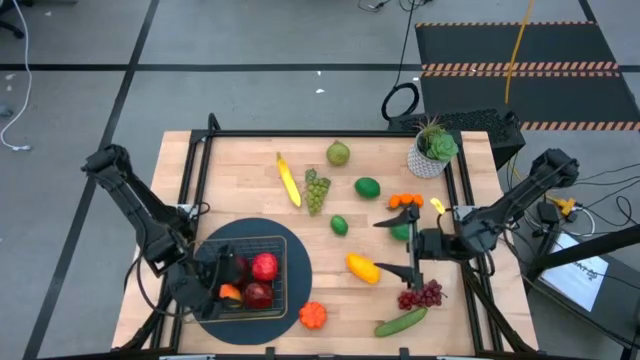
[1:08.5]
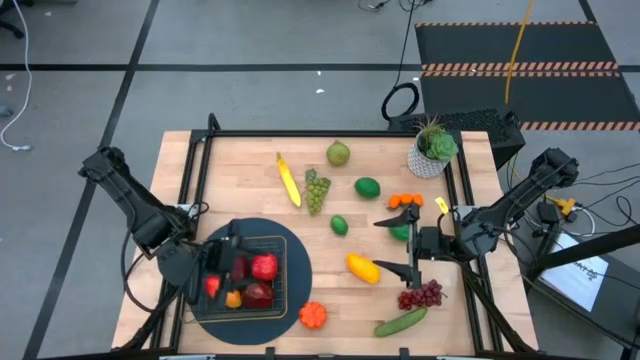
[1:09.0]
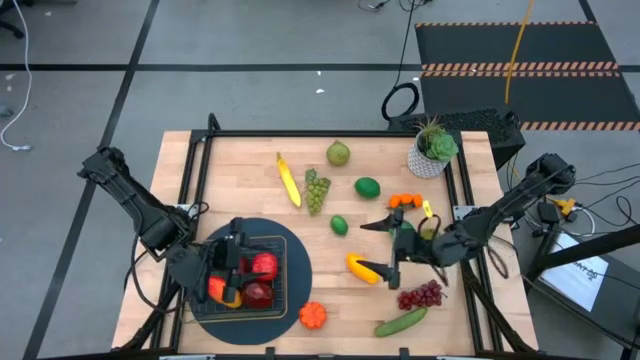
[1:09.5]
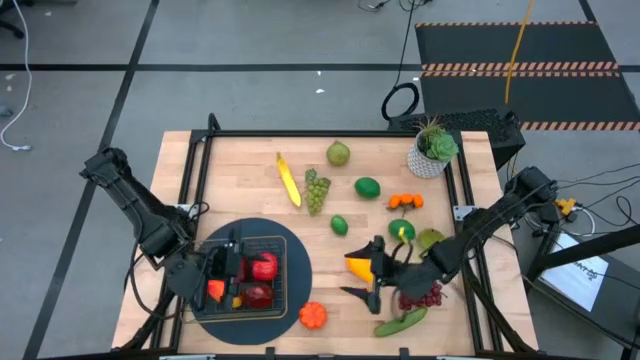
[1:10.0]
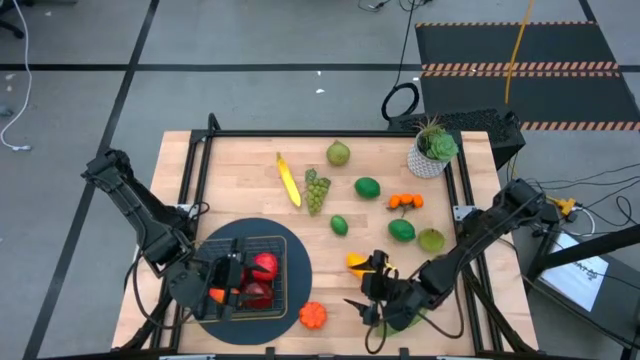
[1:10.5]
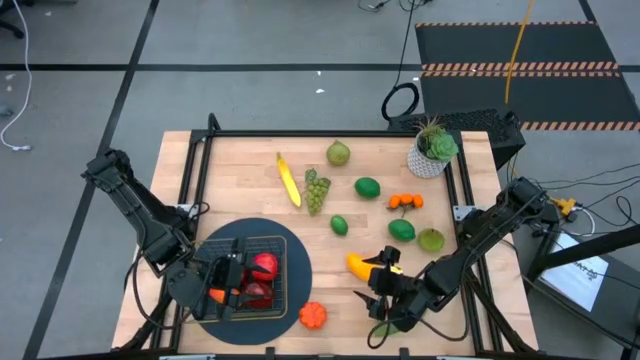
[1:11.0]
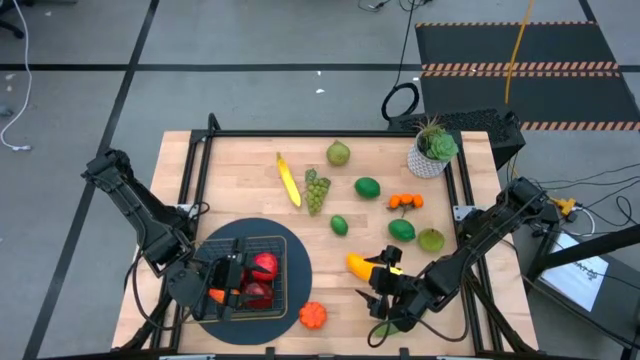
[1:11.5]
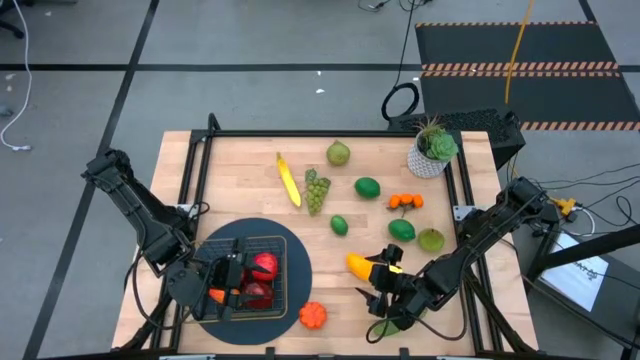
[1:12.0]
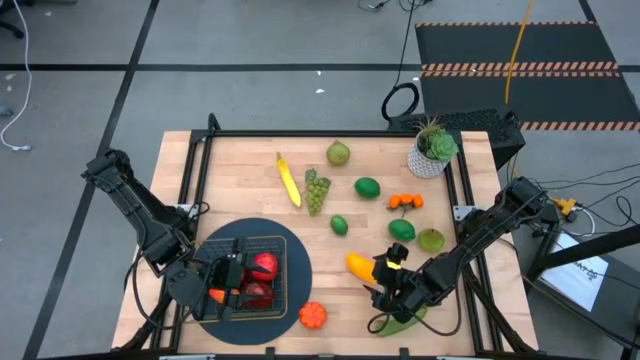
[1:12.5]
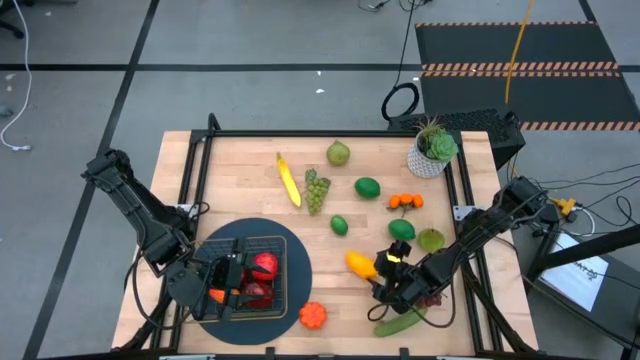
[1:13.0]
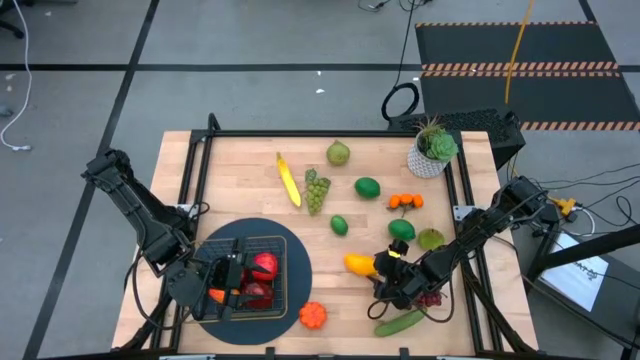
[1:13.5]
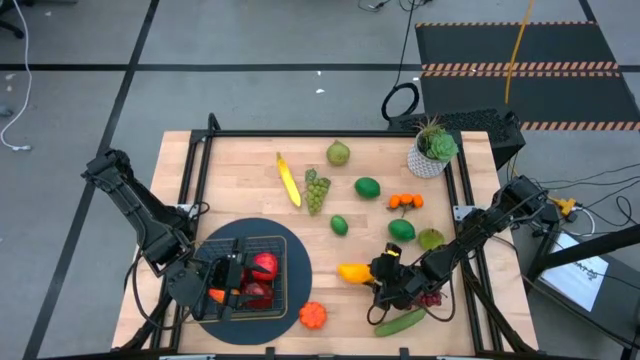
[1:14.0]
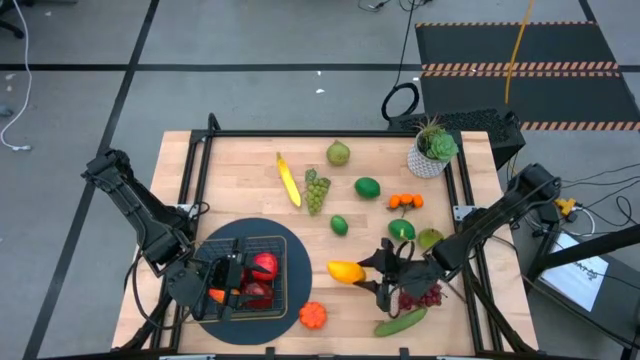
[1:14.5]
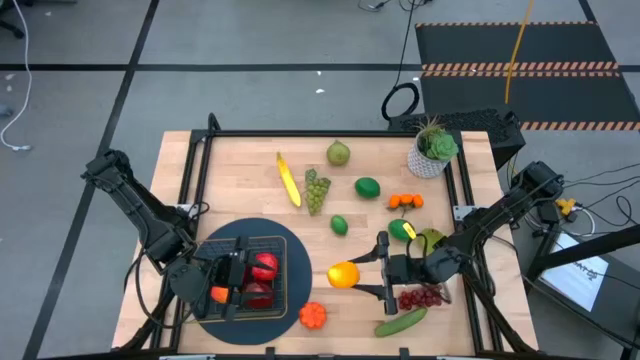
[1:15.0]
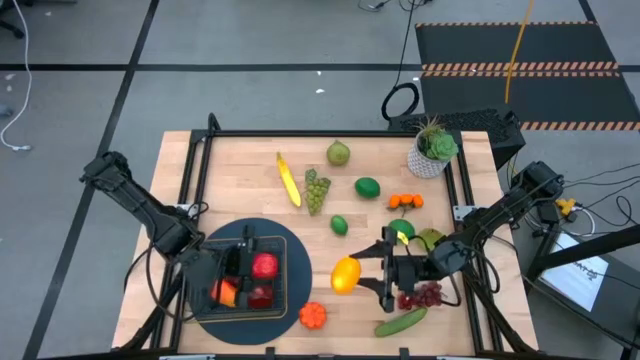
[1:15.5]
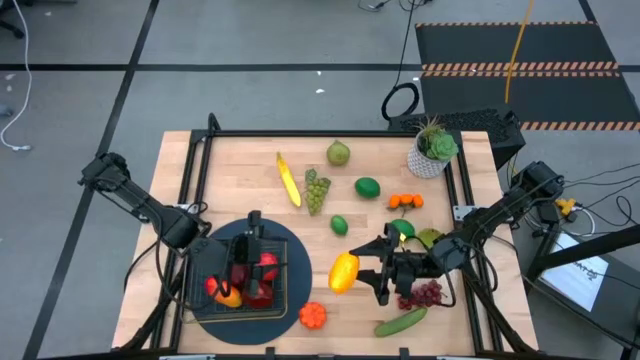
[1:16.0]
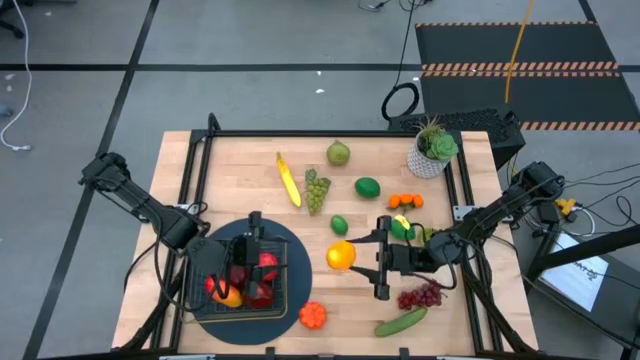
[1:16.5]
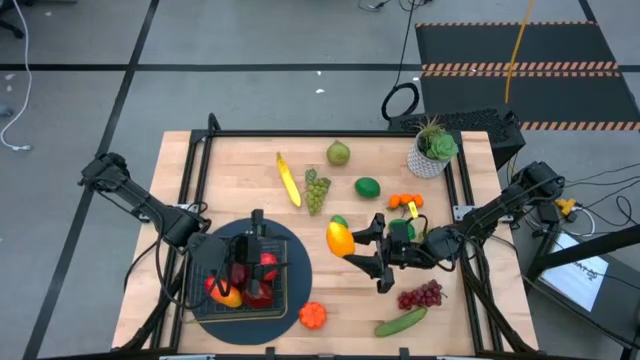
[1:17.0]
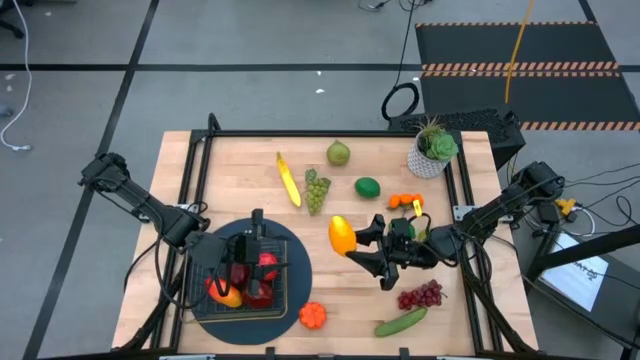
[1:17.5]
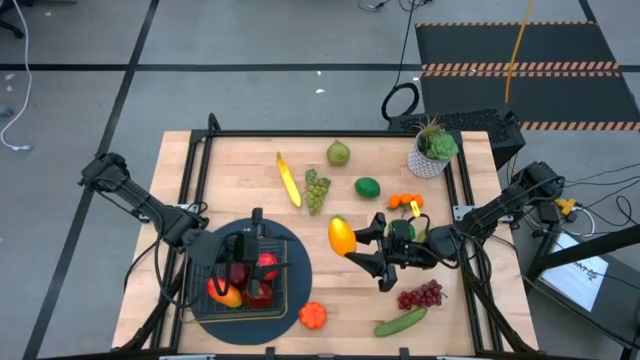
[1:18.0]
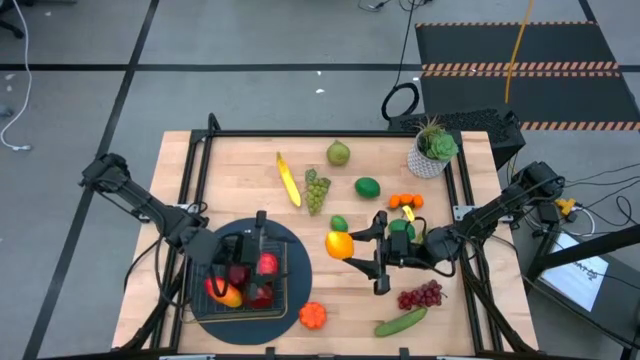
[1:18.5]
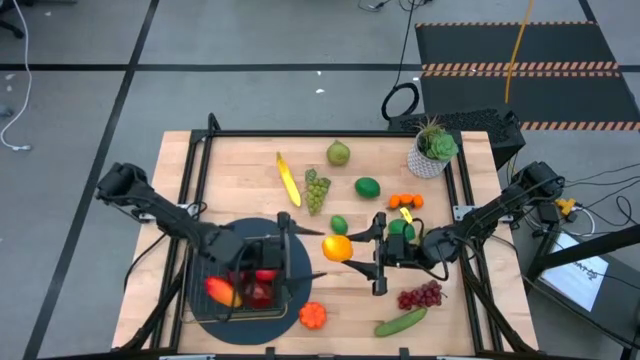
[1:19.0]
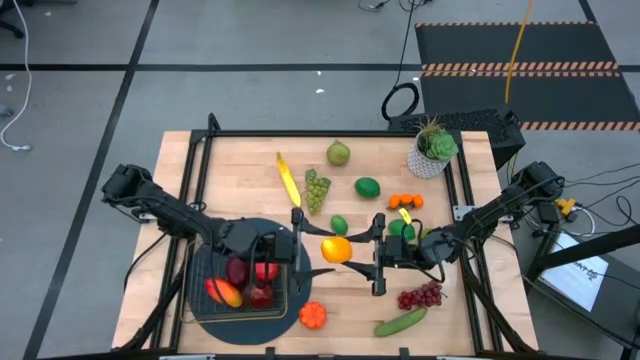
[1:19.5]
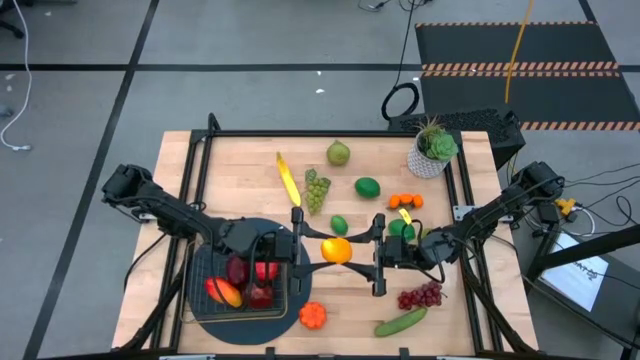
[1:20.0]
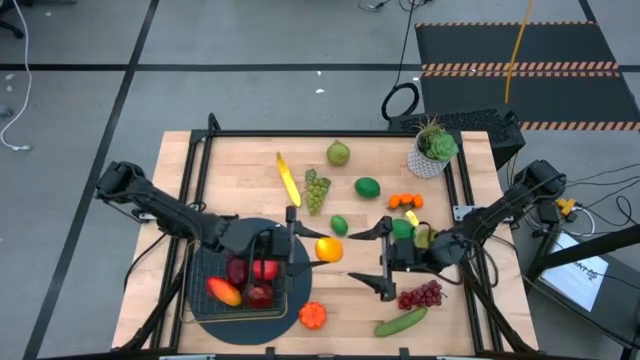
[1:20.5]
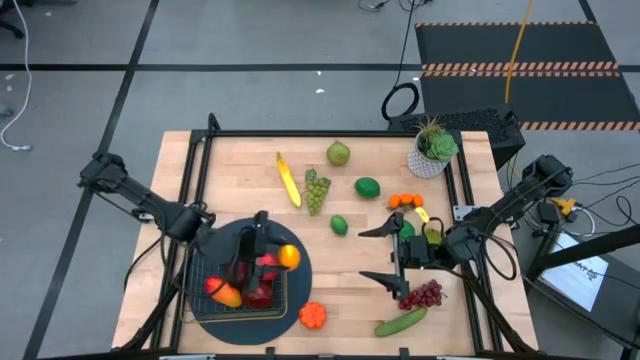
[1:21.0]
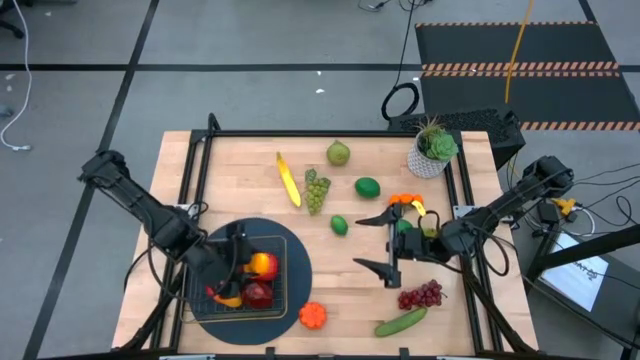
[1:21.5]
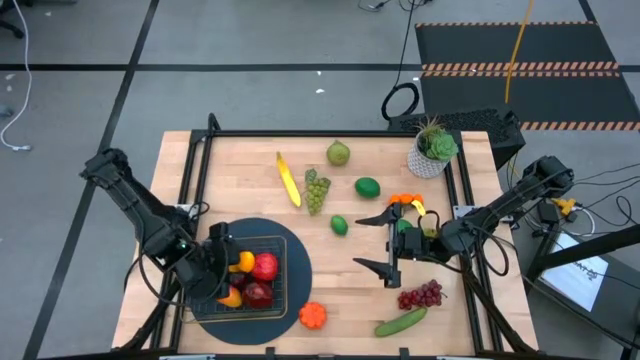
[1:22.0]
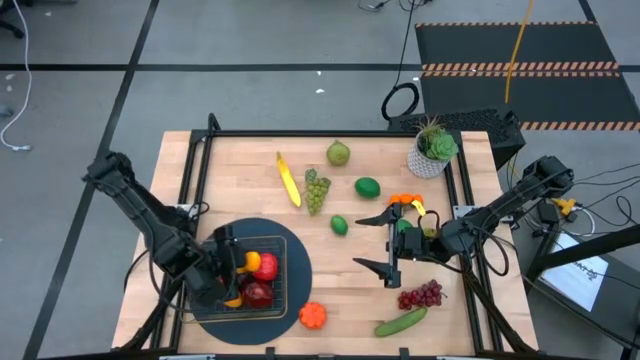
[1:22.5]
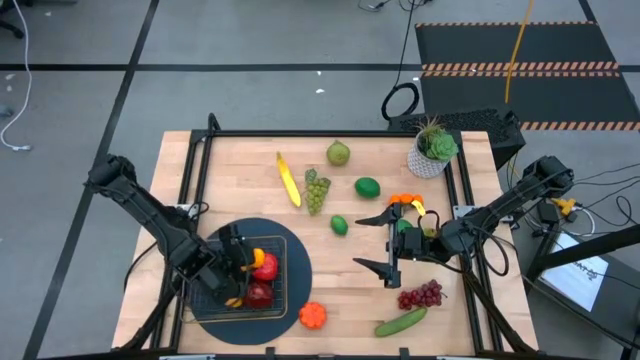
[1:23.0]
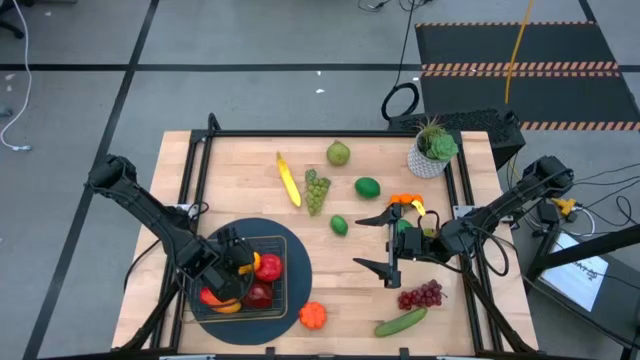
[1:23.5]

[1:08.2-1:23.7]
Task: Build produce basket
Put the yellow mango into the gold wire basket

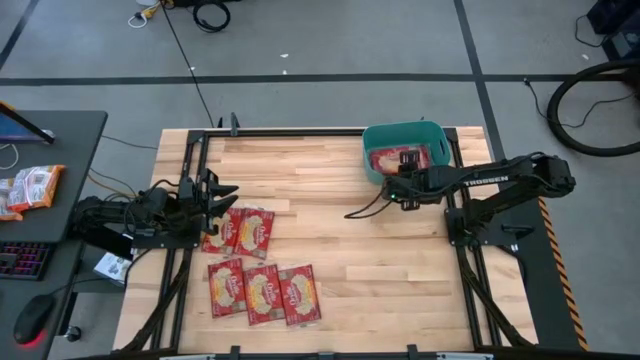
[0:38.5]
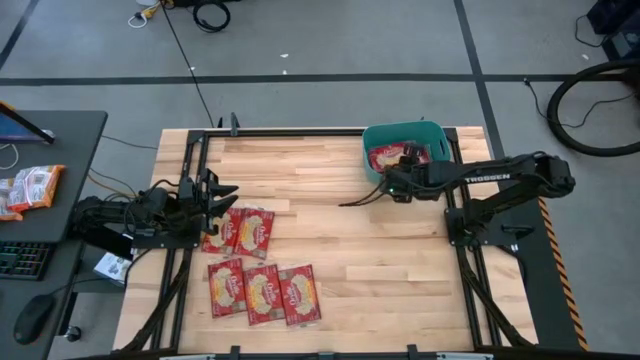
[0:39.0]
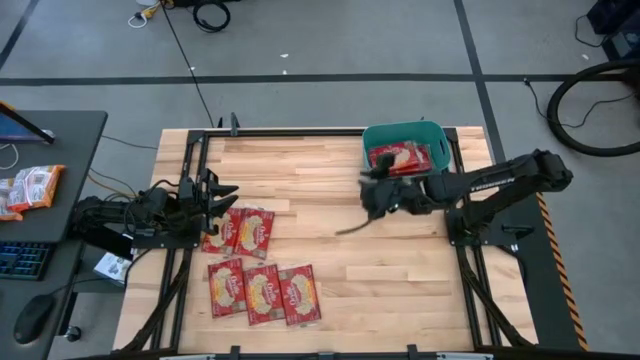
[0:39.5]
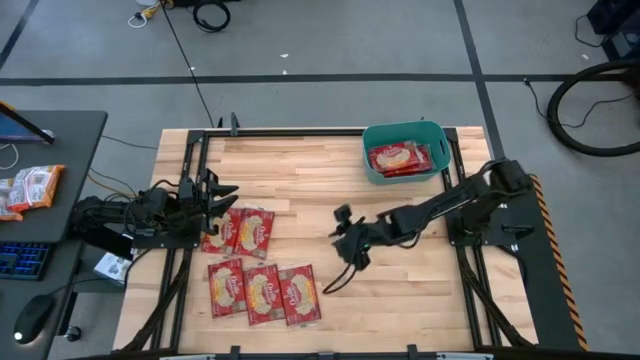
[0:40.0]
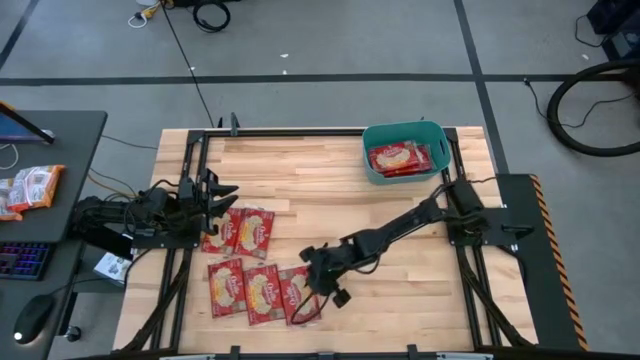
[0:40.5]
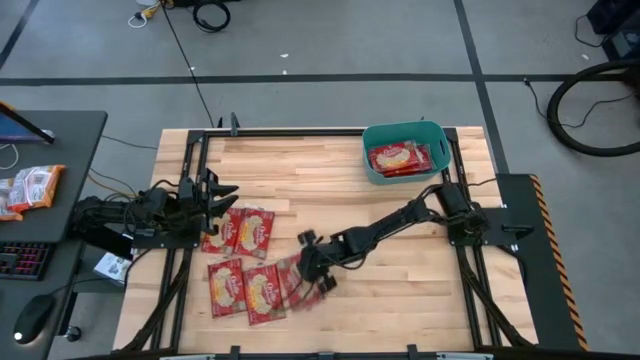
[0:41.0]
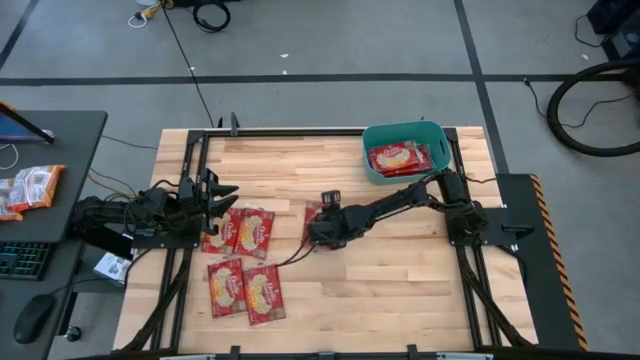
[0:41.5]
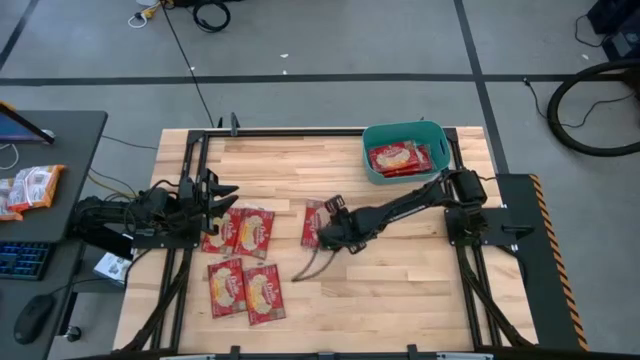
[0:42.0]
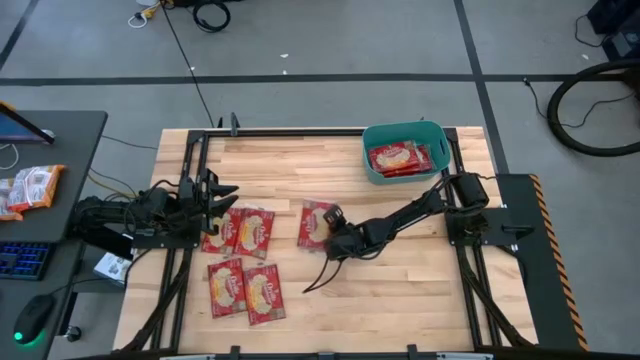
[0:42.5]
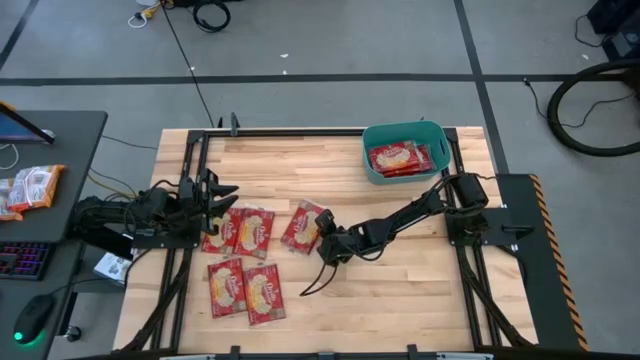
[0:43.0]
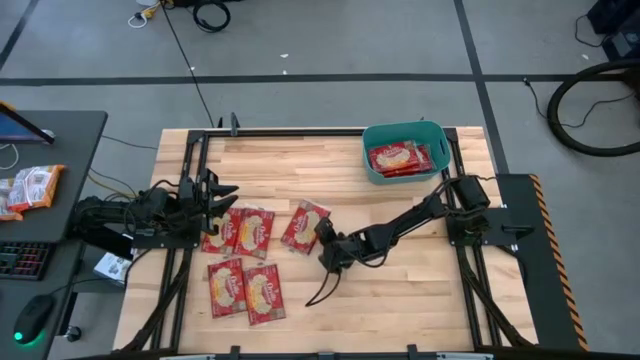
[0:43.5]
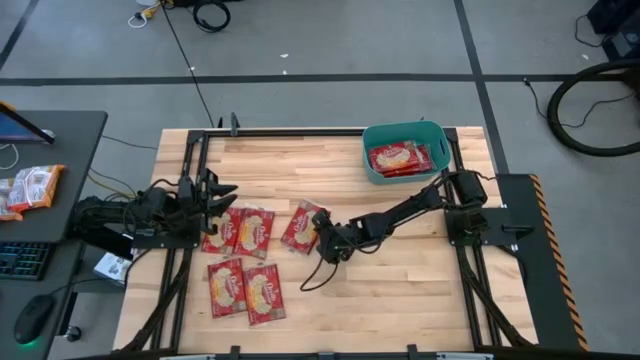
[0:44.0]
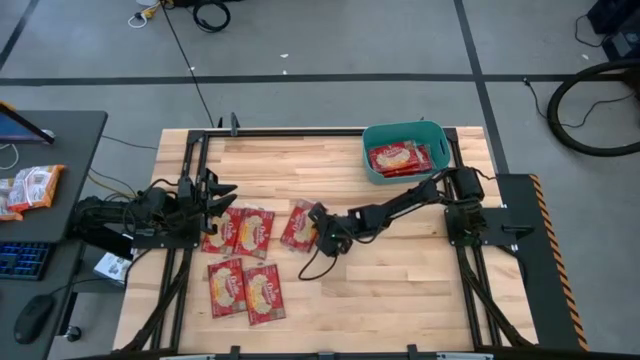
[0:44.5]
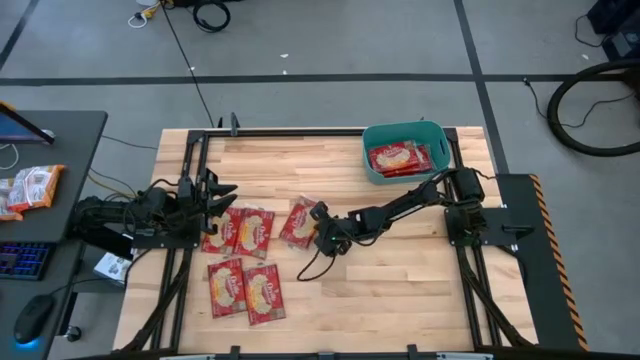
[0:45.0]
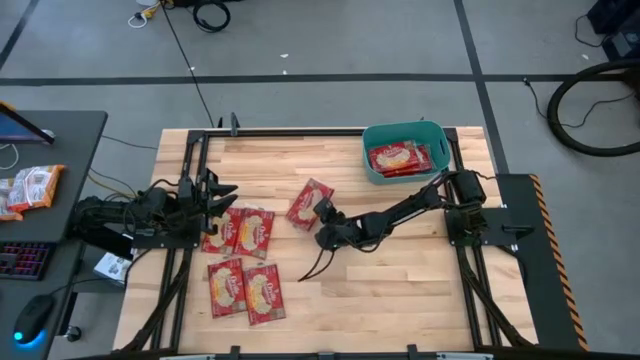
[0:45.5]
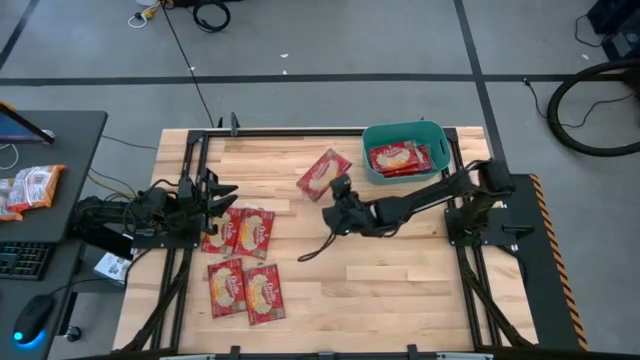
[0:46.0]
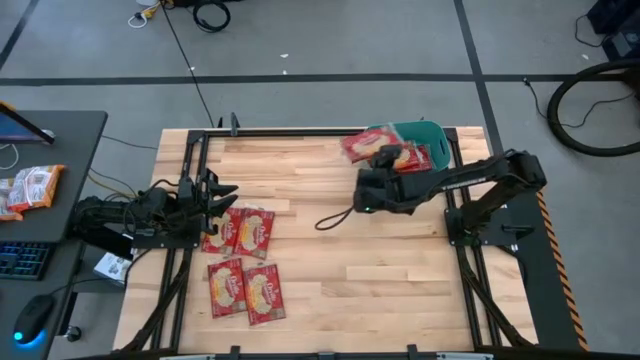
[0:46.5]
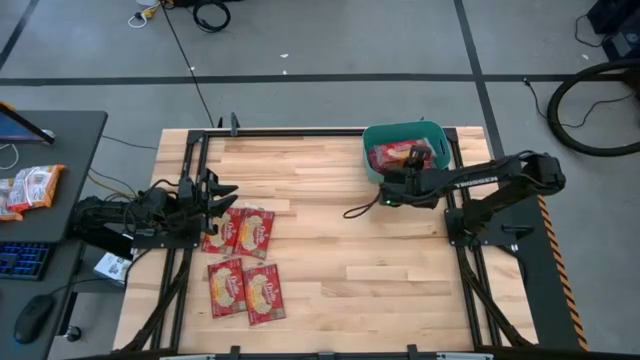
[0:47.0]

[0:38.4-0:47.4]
Task: Sort popcorn bags into baskets
Put the red popcorn bag into the green bin
